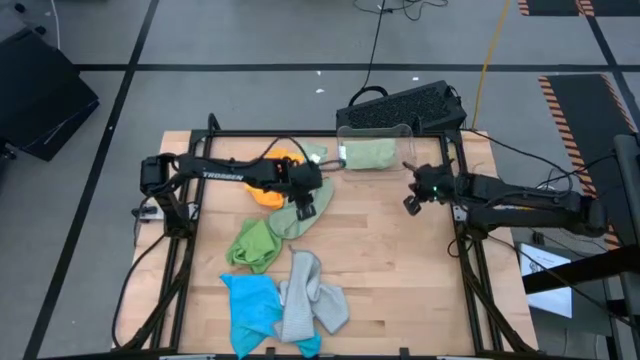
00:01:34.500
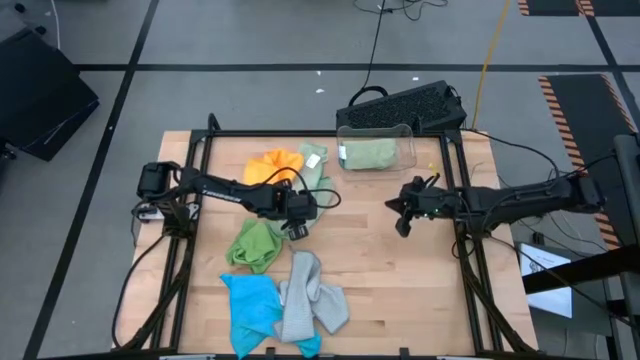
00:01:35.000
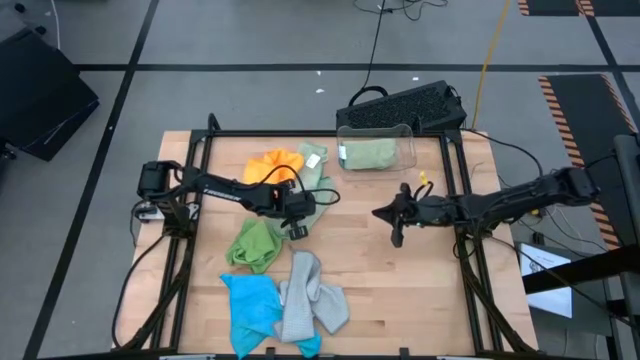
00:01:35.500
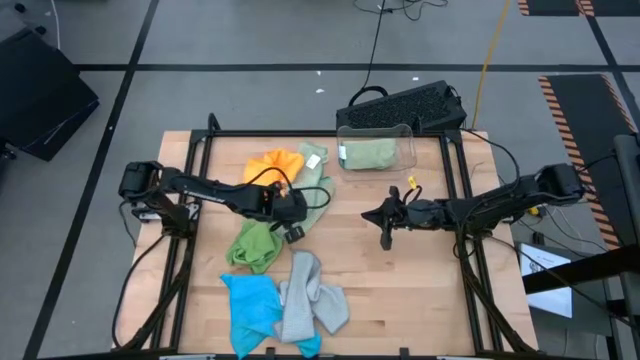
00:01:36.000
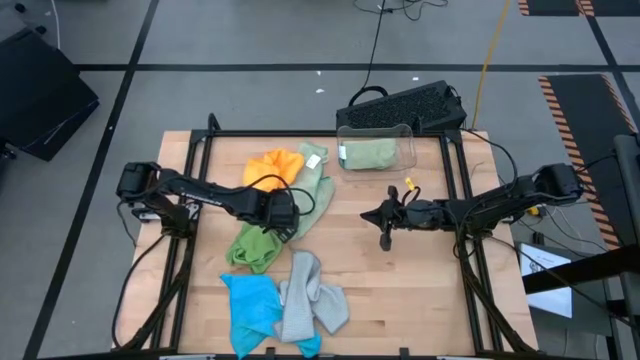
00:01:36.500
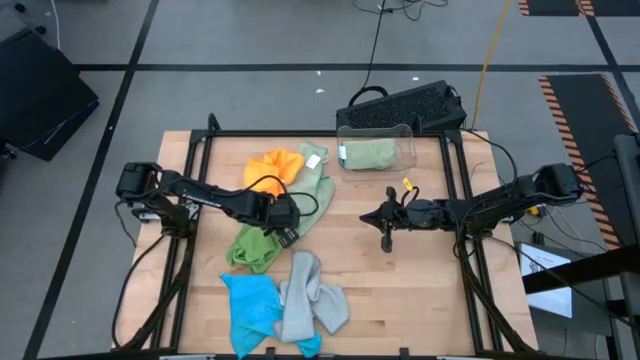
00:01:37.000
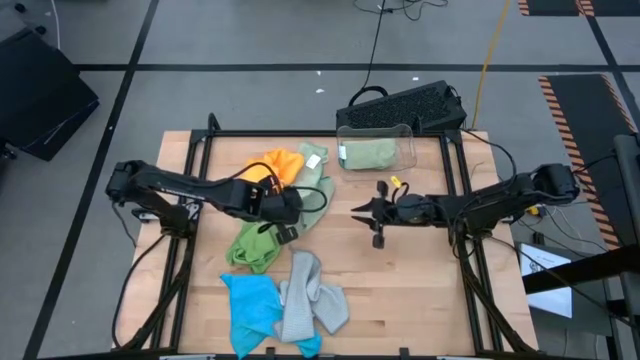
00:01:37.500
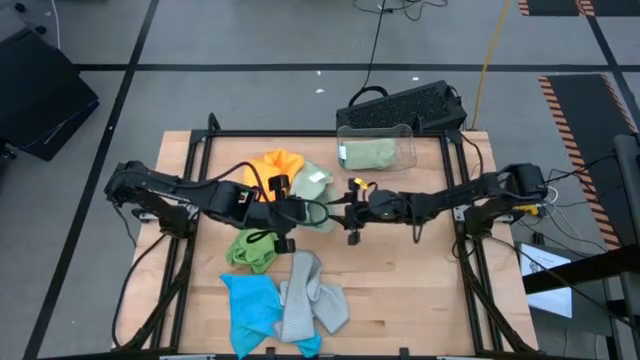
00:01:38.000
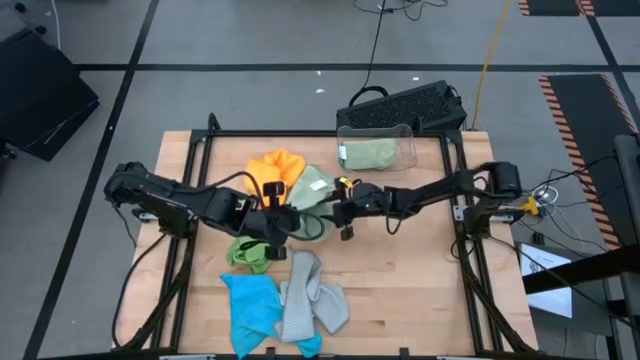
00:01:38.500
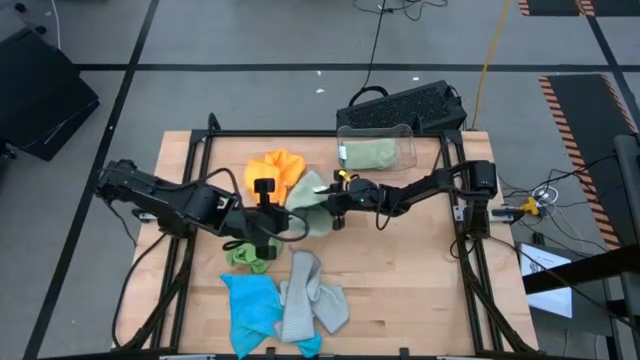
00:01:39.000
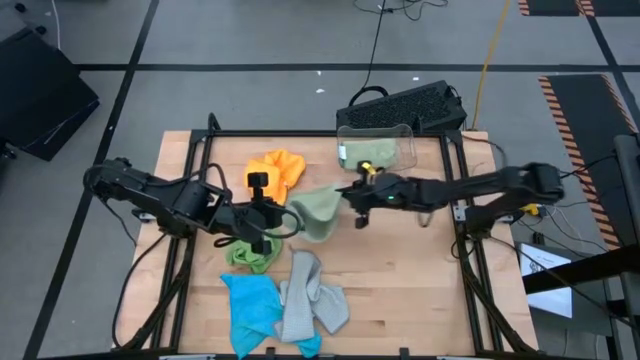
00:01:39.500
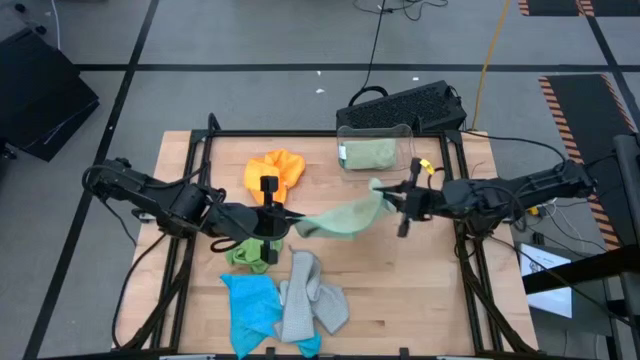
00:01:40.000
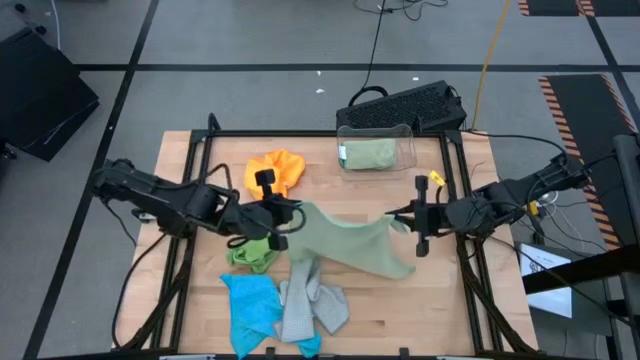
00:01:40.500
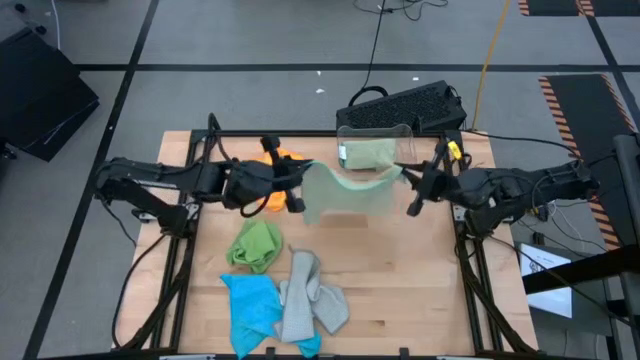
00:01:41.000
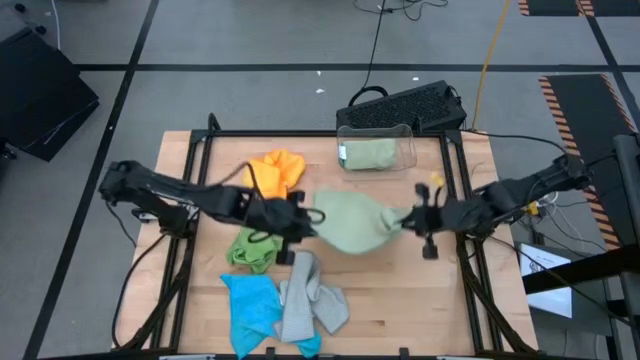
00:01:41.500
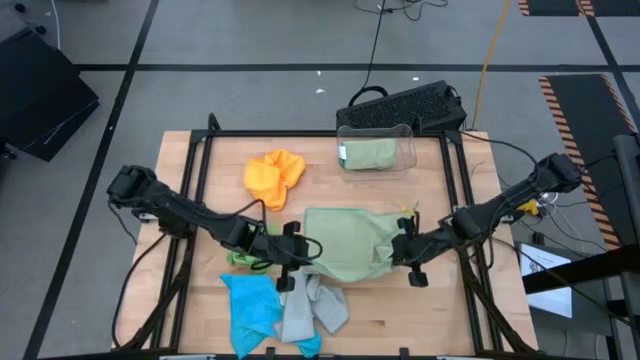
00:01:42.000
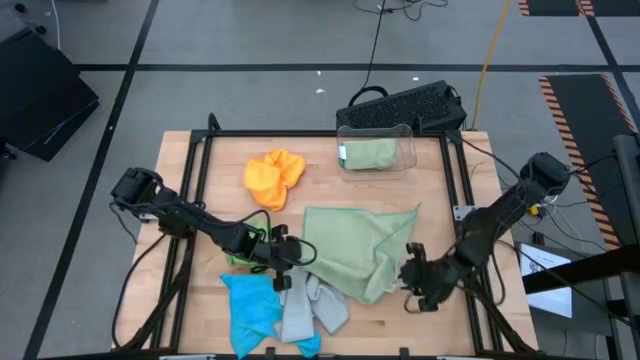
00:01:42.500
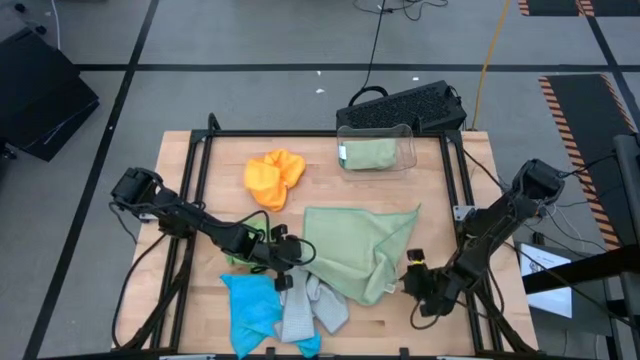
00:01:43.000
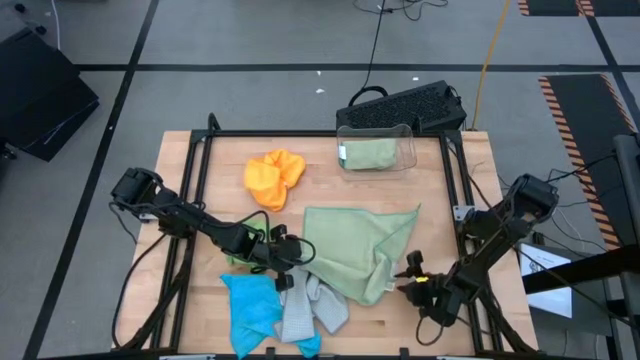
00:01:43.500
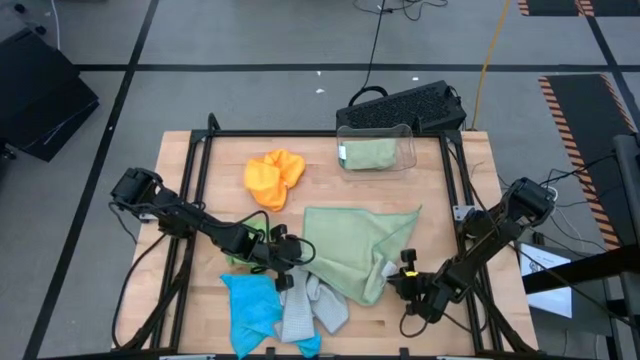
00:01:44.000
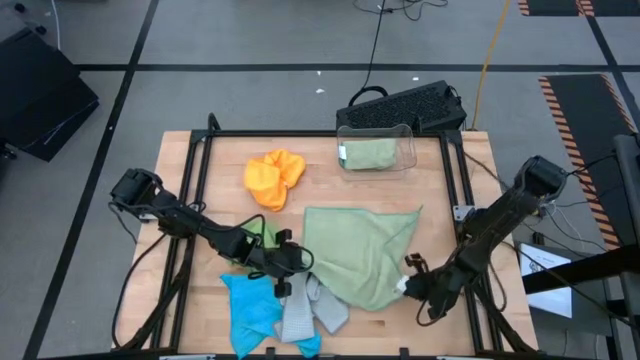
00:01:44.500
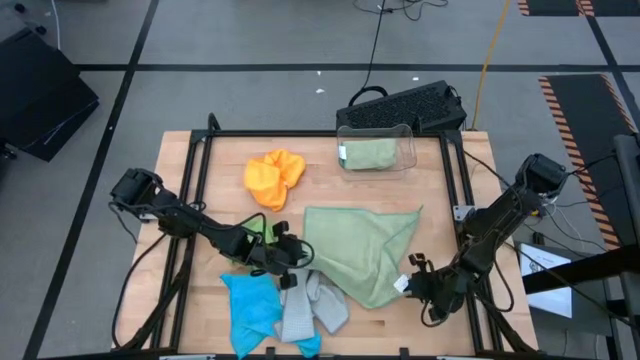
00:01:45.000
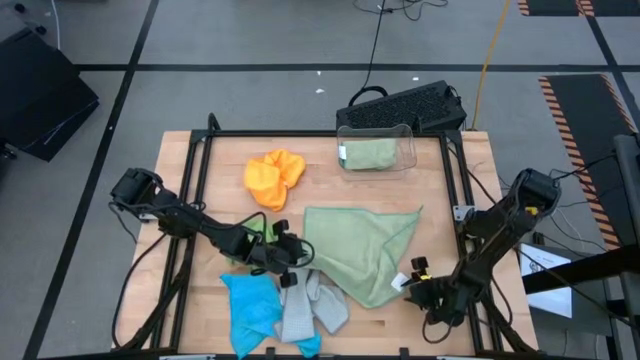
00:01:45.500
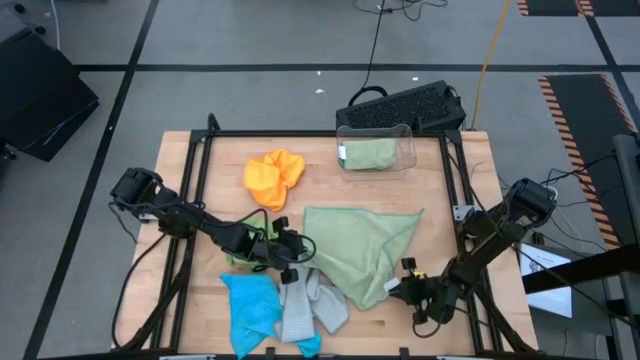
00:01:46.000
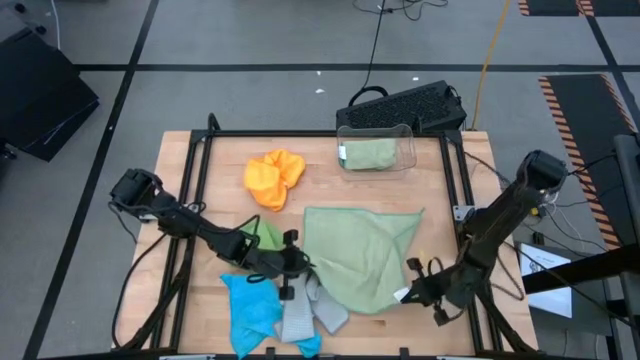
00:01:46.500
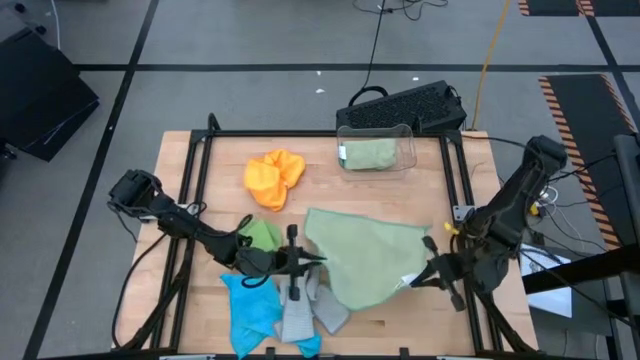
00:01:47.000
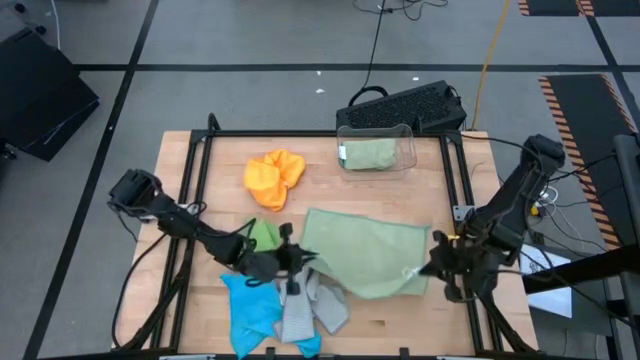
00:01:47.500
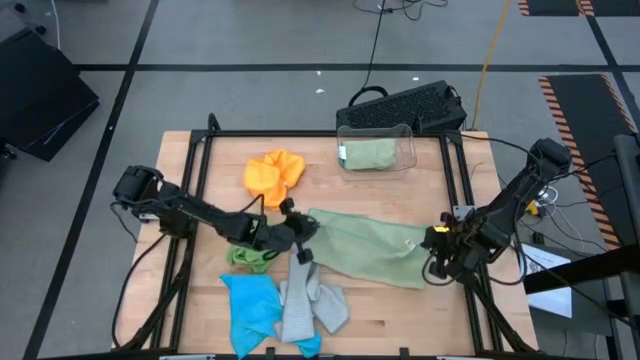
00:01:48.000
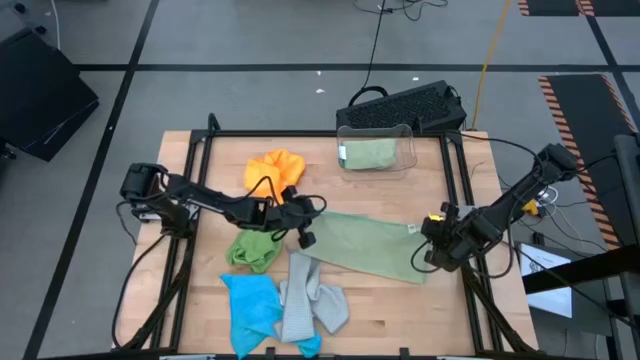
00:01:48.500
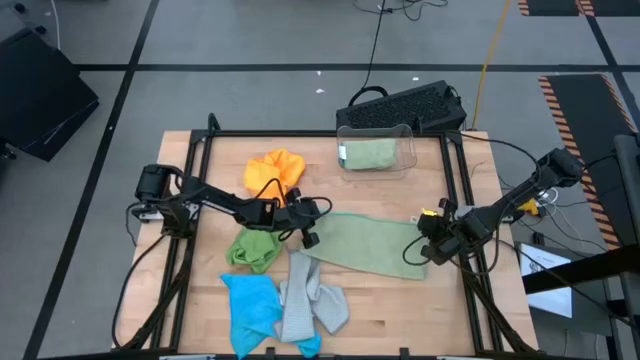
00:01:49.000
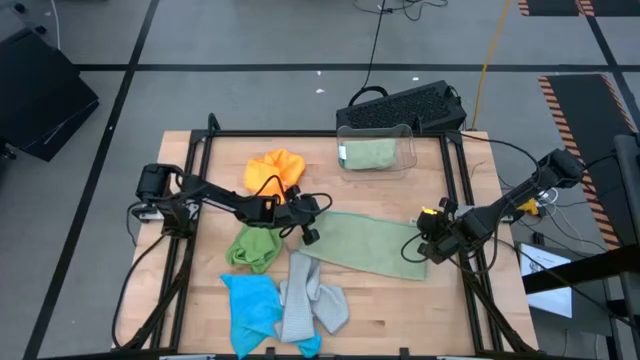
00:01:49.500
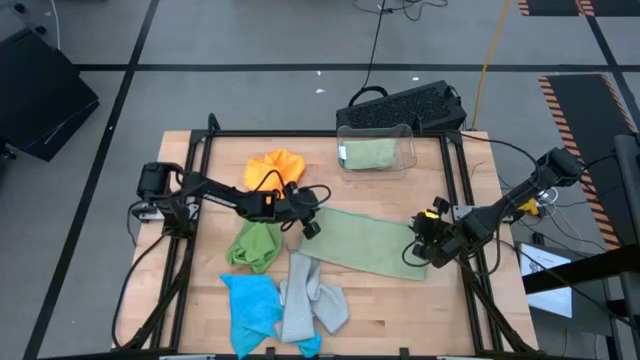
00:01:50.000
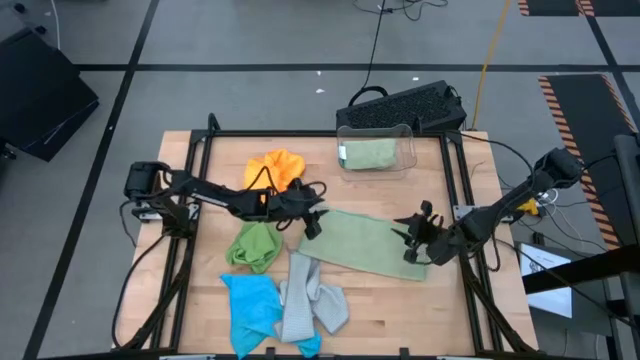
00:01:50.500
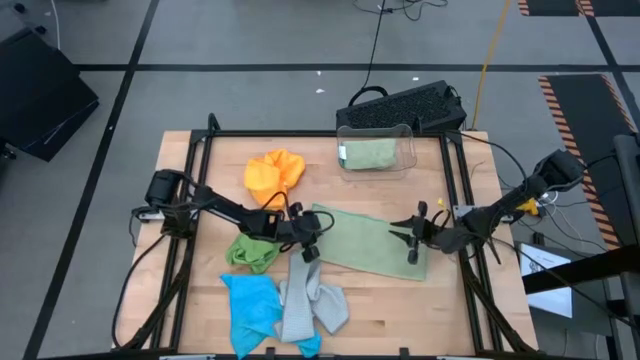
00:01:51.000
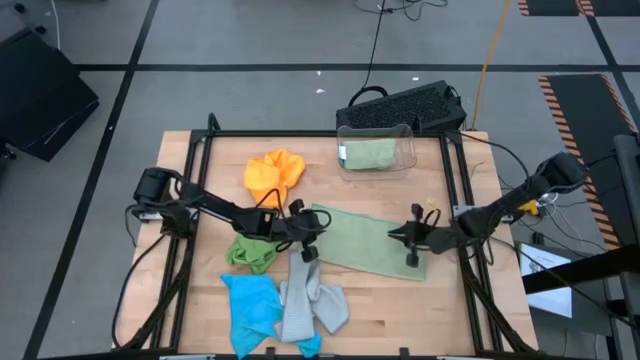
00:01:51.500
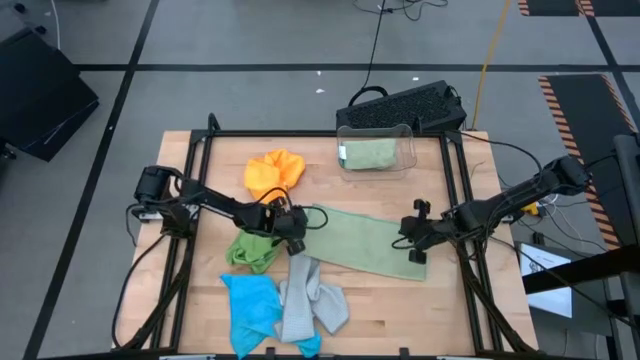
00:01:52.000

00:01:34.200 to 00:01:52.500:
Task: Fold microfiber towels
Fold the light green microfiber towel
